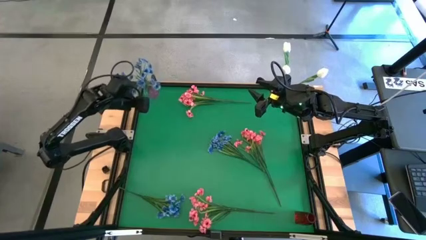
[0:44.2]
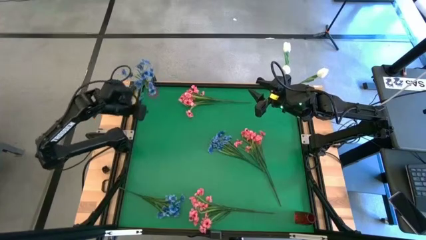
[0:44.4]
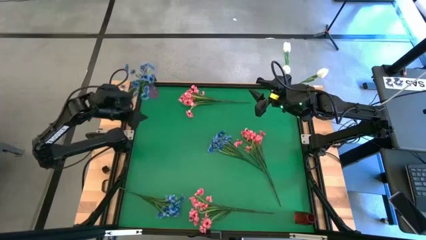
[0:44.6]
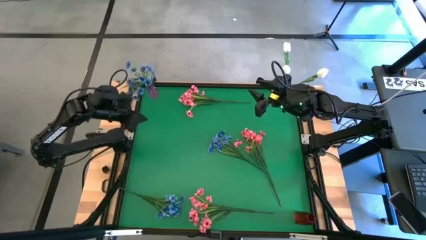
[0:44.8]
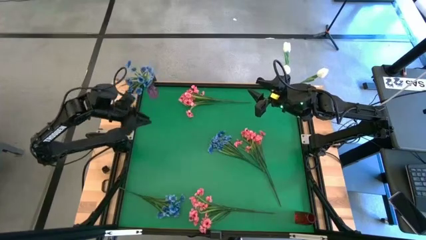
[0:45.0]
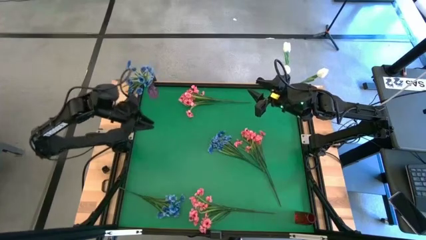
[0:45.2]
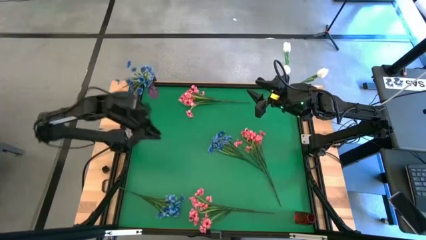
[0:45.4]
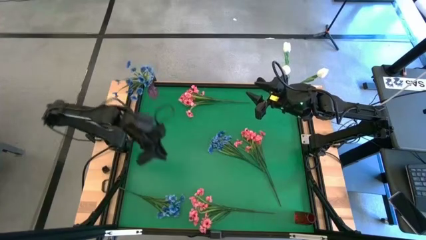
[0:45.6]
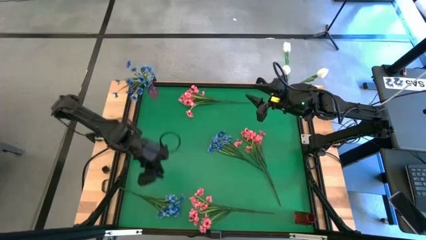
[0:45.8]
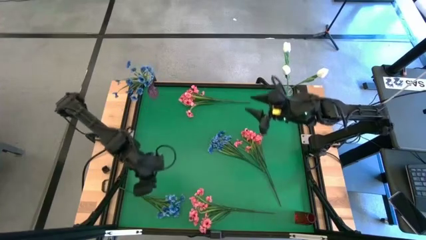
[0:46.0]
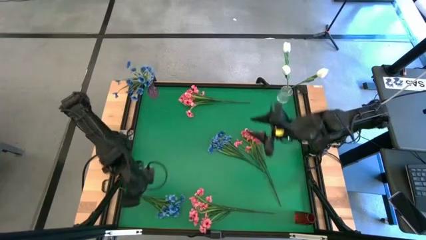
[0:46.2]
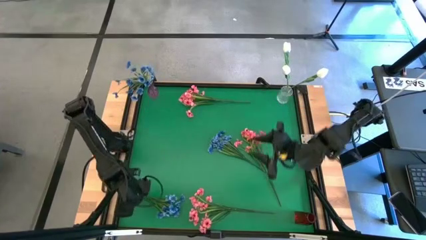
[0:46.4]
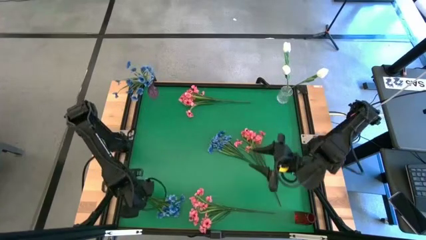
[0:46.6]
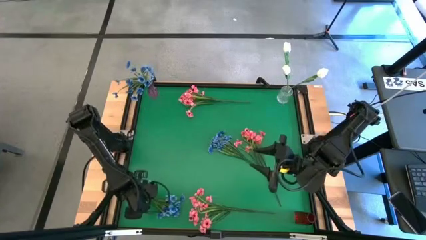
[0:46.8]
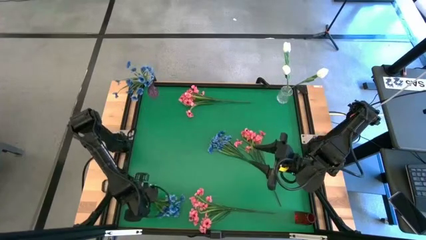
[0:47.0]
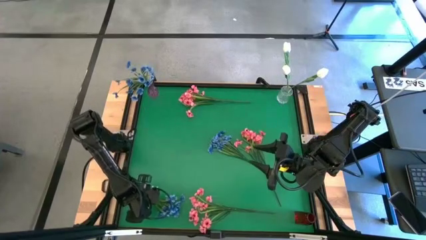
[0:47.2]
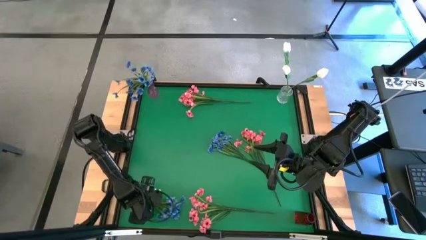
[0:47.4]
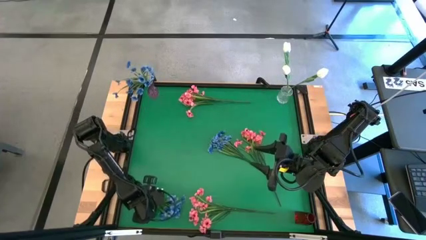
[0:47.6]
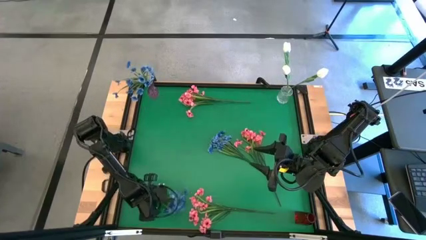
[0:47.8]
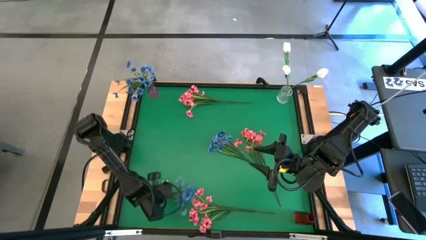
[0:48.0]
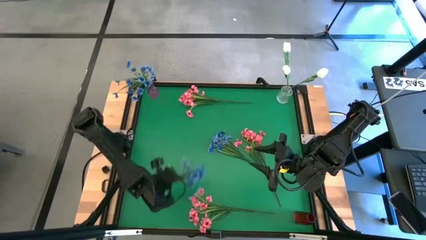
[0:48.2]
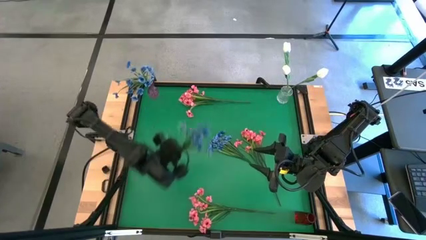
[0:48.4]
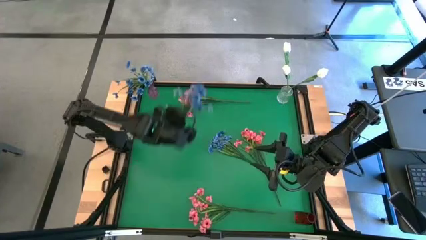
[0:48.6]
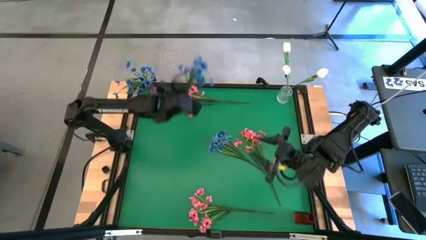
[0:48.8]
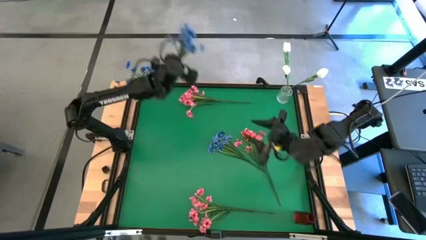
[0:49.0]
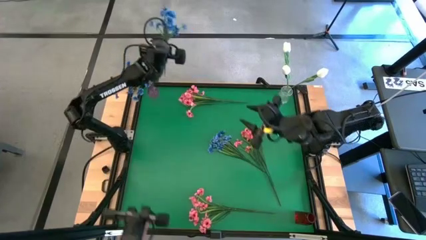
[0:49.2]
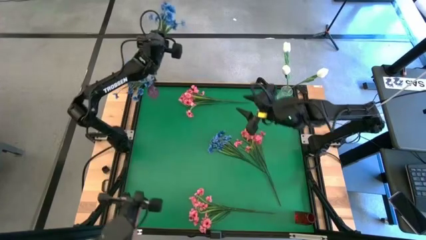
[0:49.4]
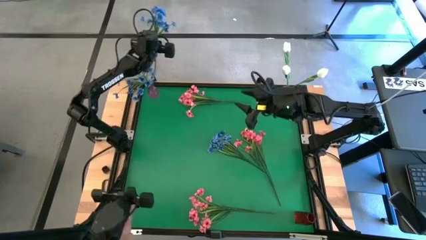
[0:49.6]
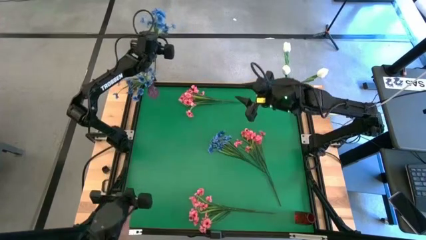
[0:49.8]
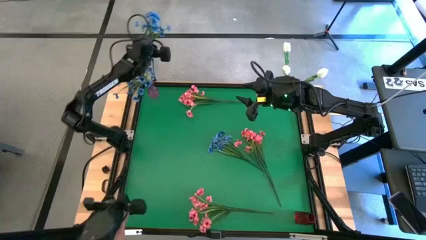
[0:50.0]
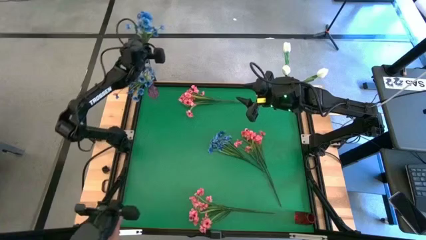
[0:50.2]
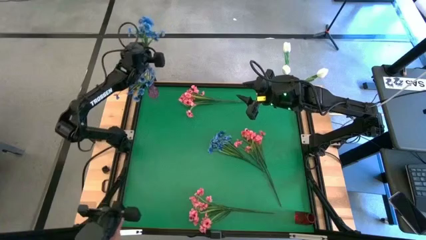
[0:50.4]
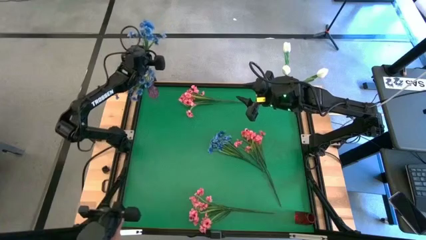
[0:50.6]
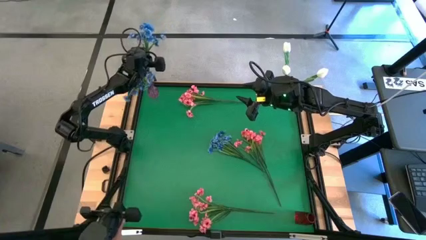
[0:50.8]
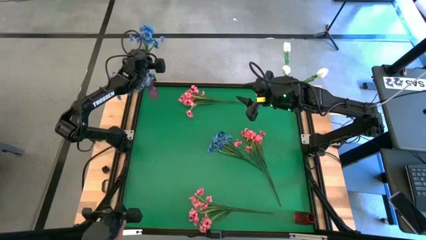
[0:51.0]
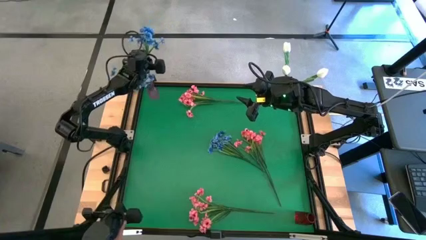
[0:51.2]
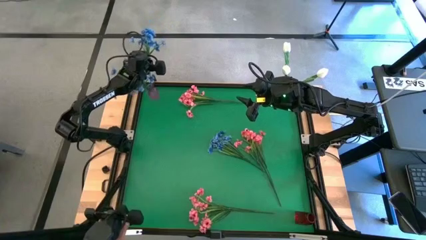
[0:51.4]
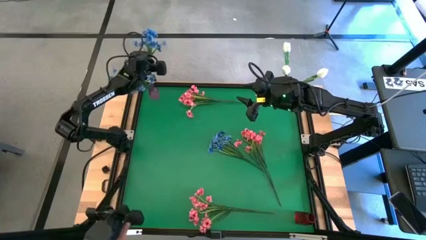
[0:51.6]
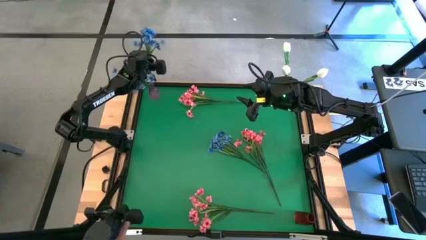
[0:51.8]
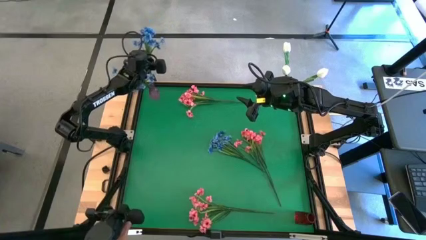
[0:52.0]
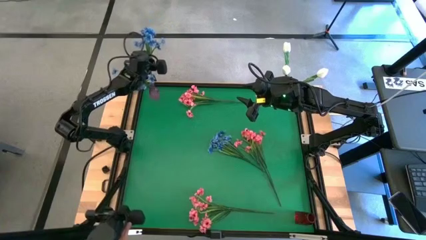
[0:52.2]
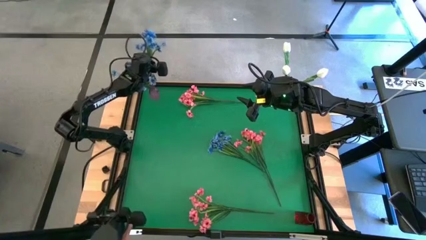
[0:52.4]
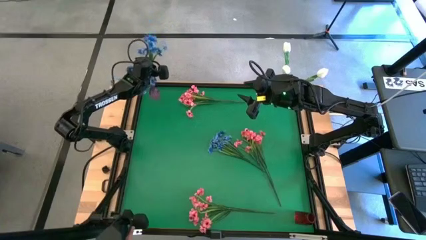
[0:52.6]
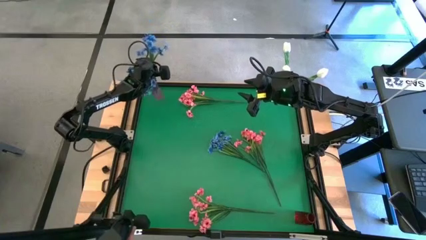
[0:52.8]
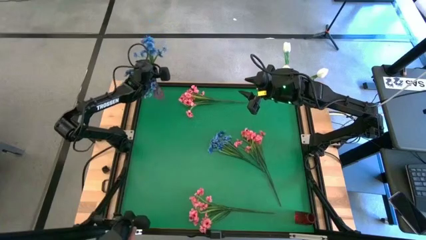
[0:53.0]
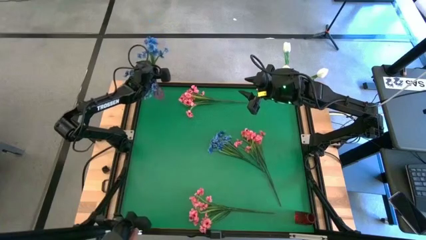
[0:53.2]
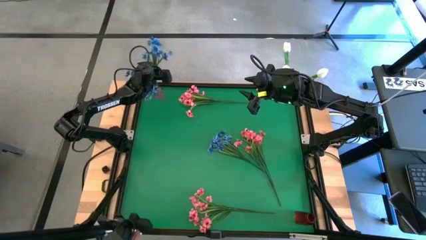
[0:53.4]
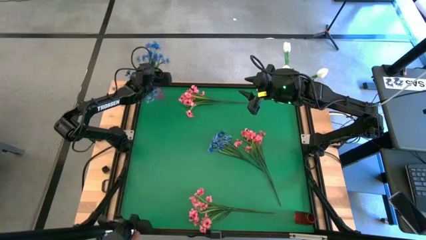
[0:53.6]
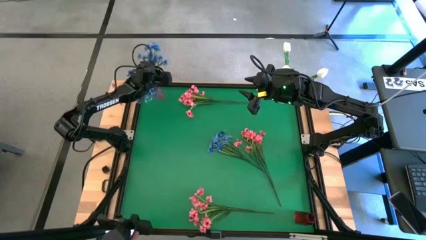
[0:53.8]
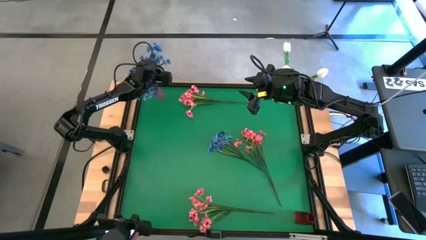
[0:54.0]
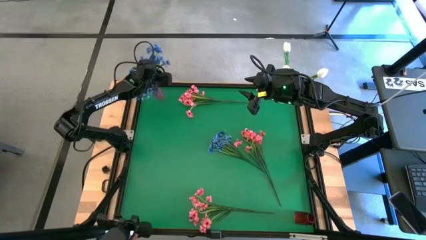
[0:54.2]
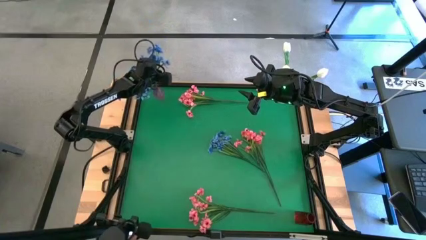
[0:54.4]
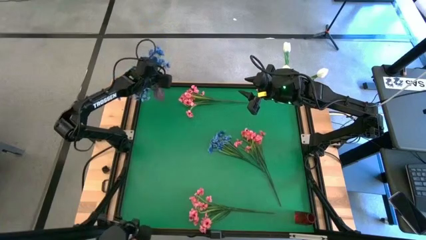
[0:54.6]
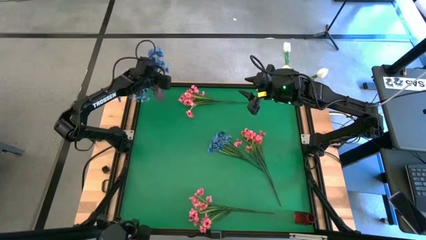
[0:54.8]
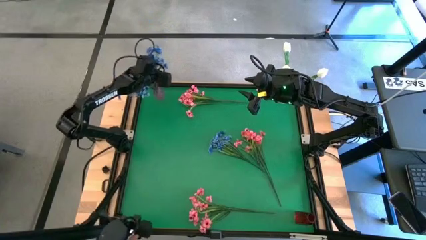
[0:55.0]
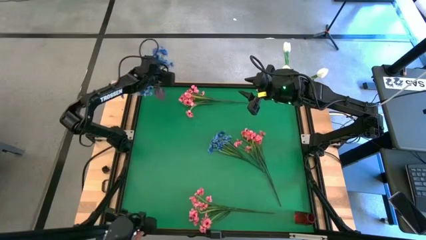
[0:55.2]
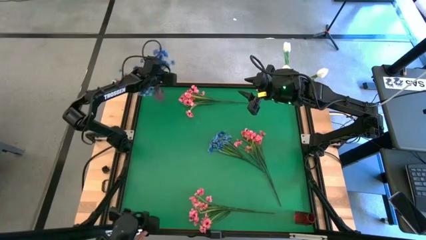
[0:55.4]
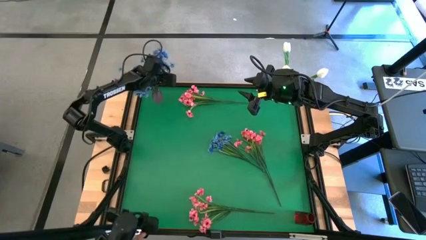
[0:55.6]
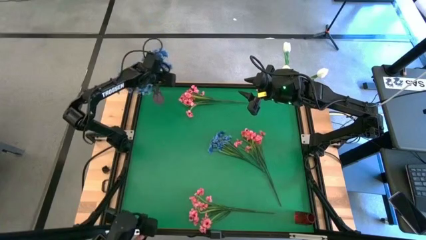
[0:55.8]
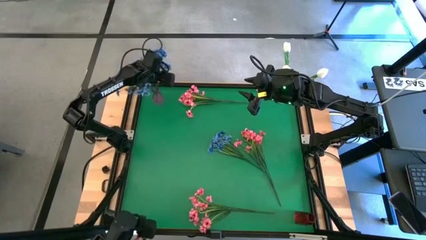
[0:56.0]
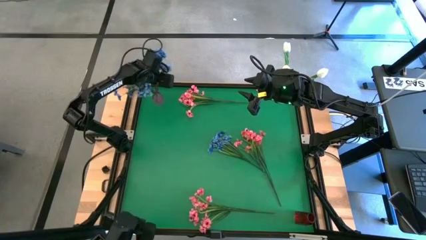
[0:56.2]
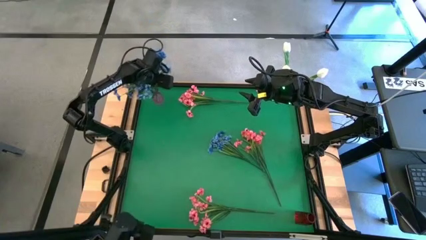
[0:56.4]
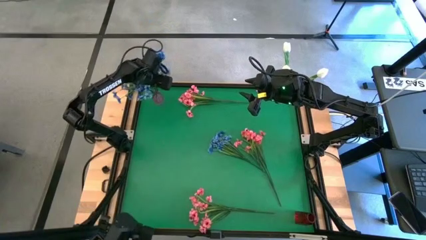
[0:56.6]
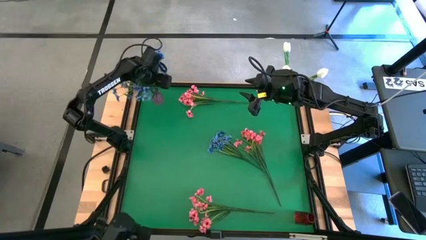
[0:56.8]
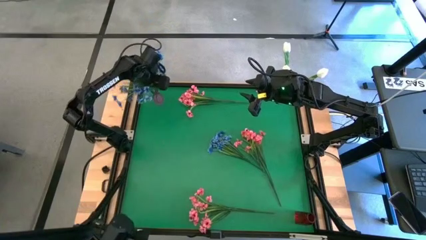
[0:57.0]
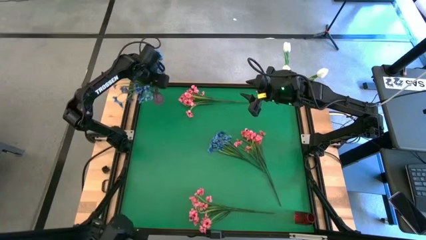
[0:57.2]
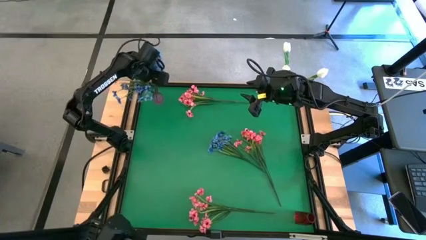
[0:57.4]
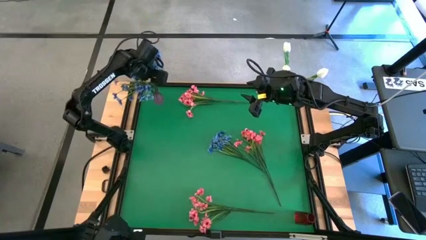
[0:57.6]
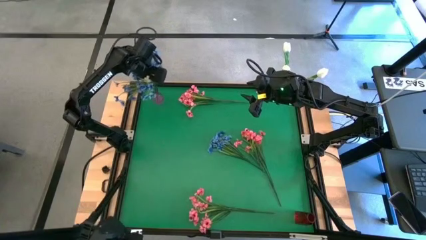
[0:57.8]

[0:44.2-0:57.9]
Task: Sort flowers into vase by color
Put the bottom blue flowers into the violet vase

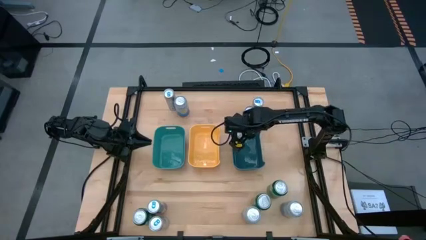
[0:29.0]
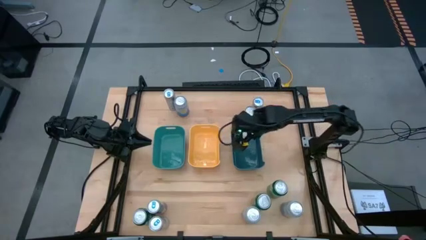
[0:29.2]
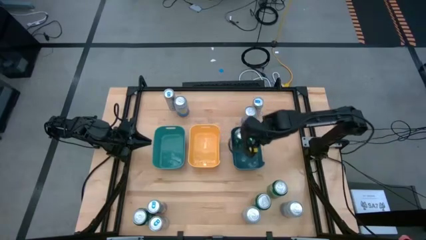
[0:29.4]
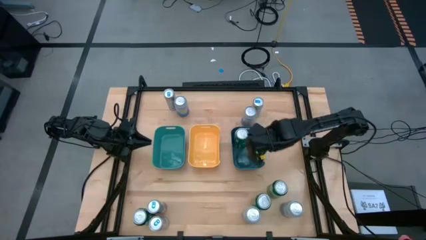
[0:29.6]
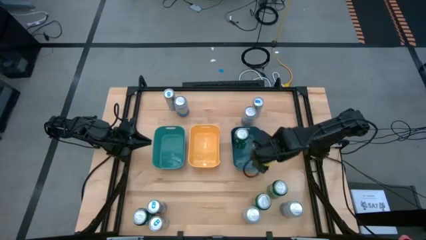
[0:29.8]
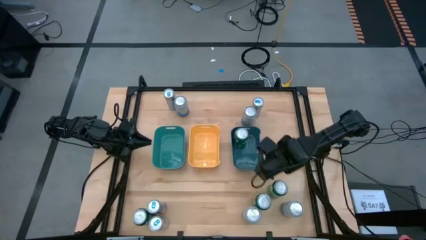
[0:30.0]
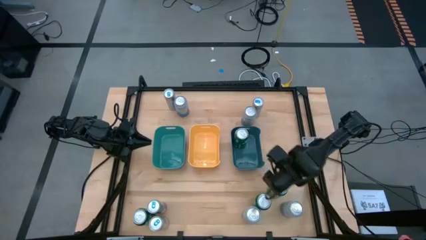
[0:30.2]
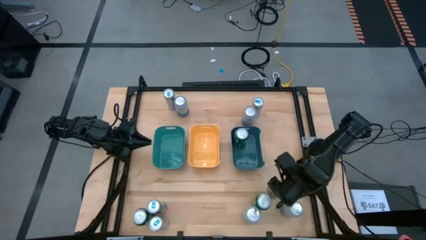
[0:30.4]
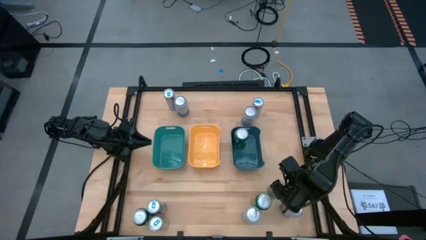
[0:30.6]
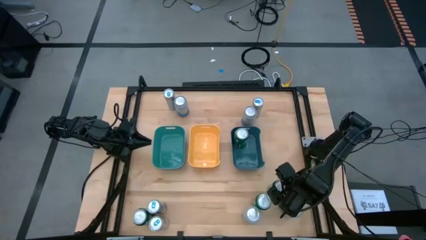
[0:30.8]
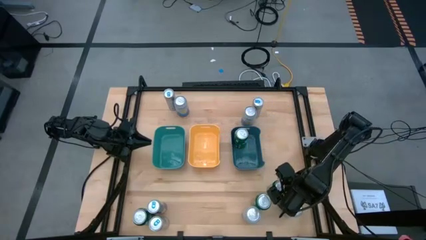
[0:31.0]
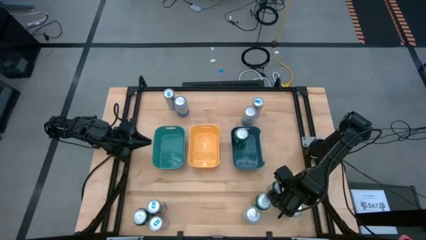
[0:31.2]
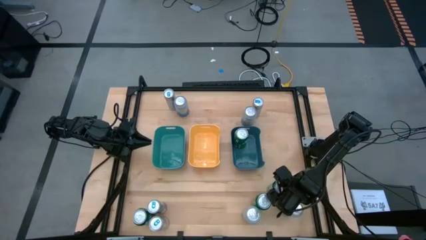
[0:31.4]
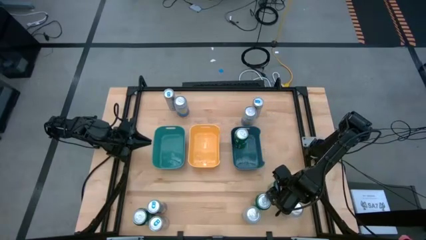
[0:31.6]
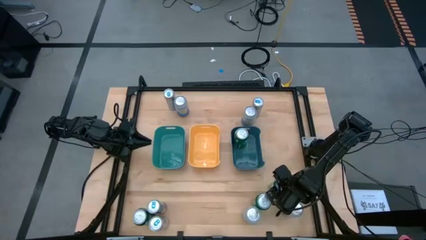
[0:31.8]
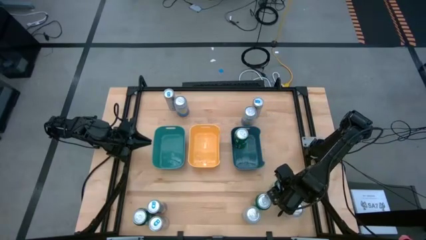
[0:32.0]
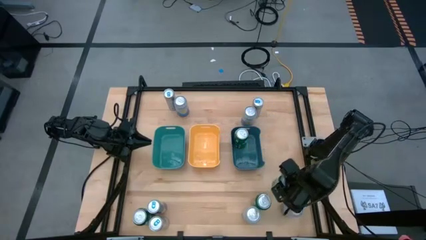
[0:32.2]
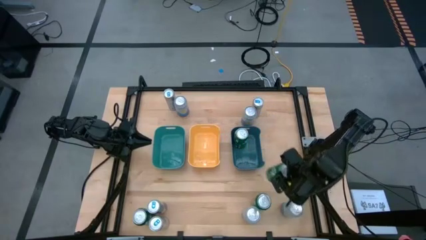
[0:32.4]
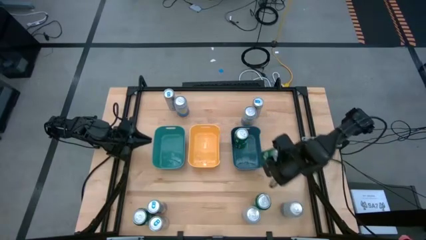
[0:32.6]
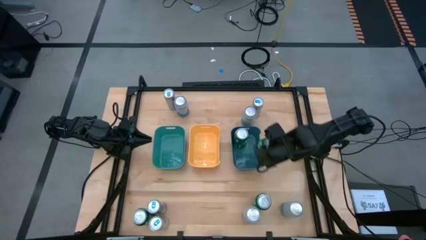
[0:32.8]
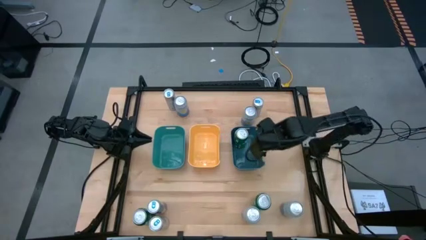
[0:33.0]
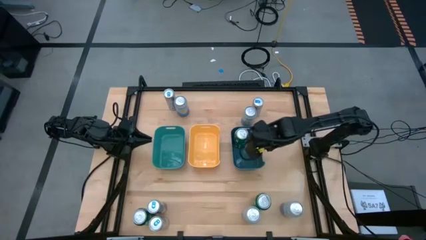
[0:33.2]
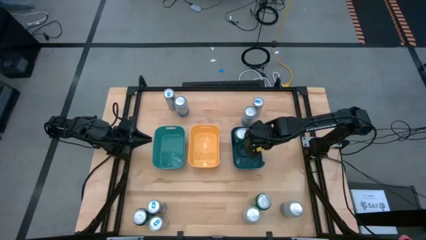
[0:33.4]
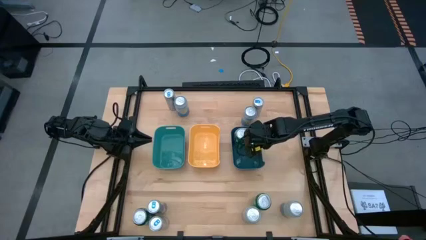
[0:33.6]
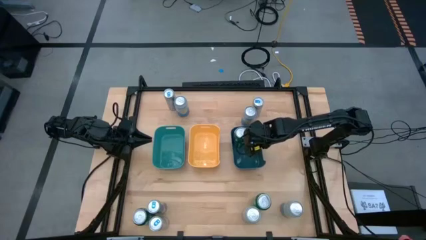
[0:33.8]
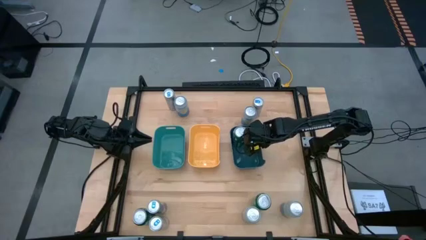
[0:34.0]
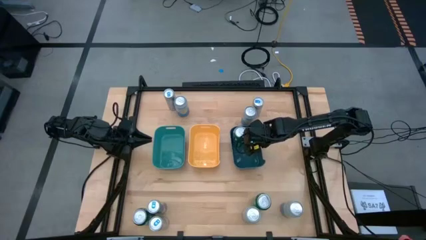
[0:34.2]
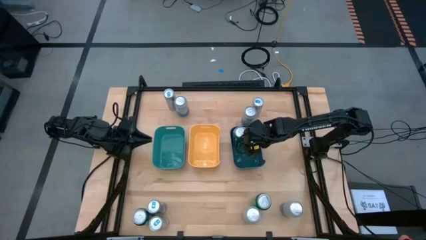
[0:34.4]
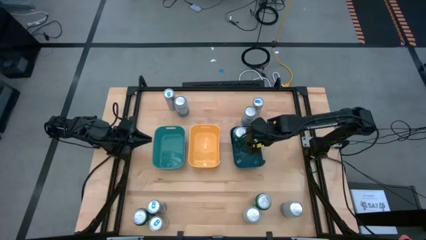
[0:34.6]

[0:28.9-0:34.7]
Task: Sort soda cans
Put the green soda can into the blue bin
